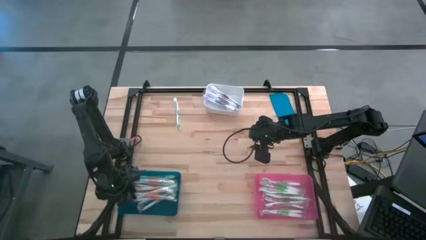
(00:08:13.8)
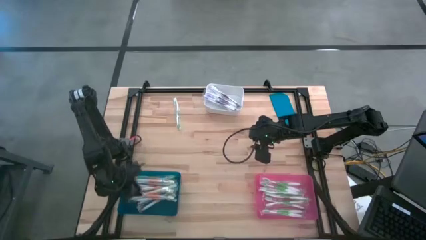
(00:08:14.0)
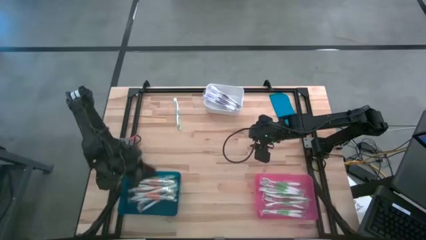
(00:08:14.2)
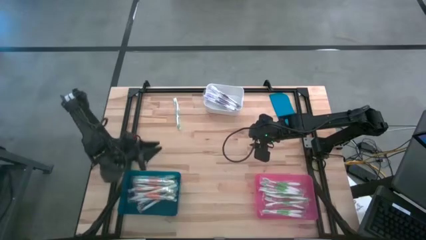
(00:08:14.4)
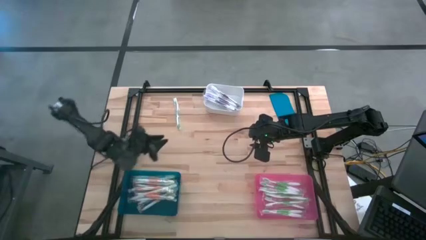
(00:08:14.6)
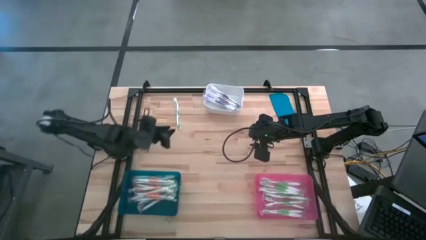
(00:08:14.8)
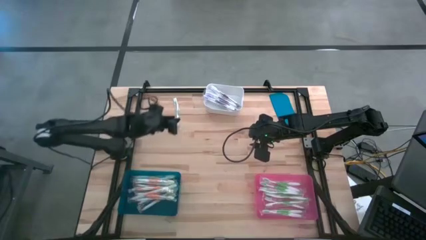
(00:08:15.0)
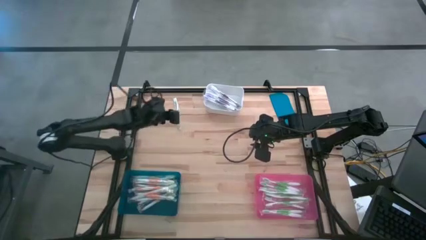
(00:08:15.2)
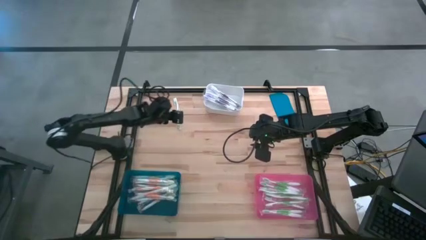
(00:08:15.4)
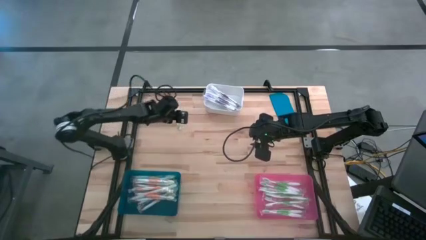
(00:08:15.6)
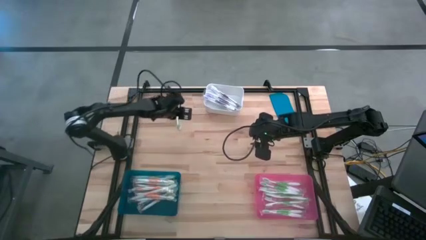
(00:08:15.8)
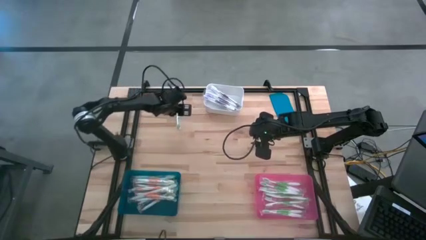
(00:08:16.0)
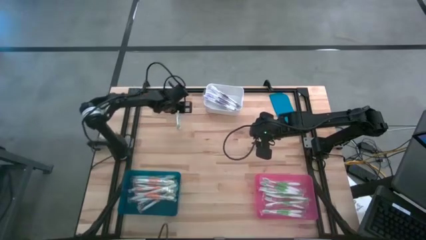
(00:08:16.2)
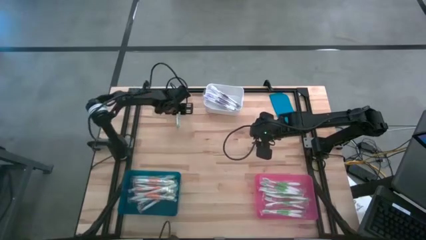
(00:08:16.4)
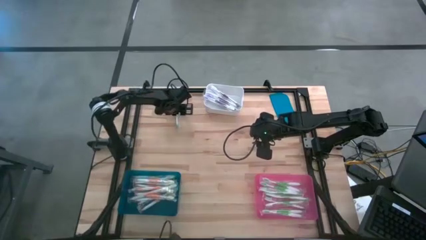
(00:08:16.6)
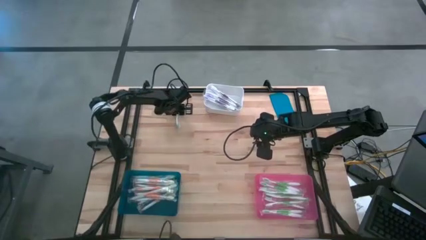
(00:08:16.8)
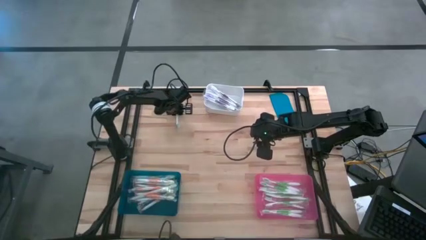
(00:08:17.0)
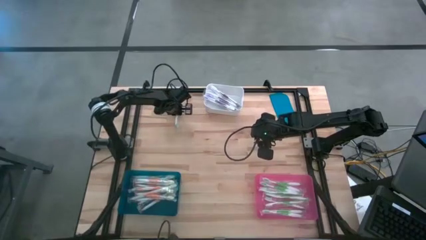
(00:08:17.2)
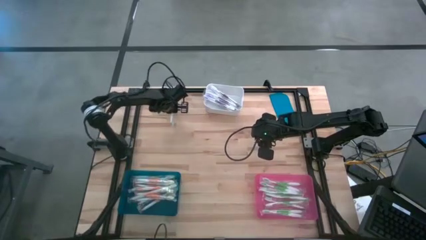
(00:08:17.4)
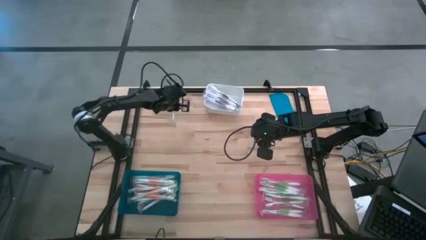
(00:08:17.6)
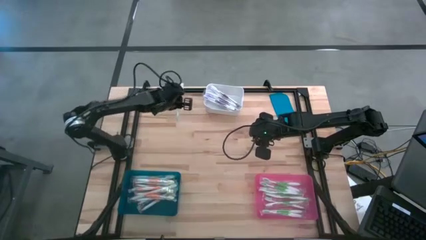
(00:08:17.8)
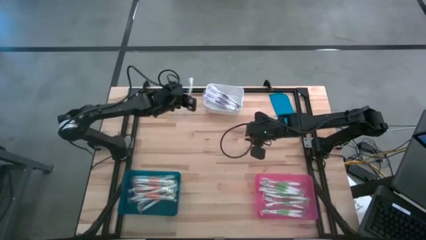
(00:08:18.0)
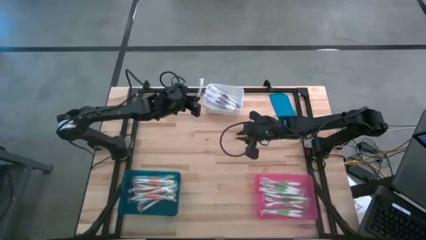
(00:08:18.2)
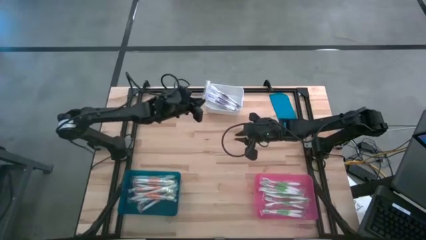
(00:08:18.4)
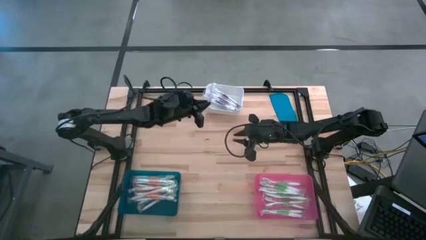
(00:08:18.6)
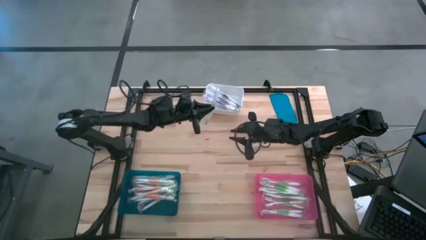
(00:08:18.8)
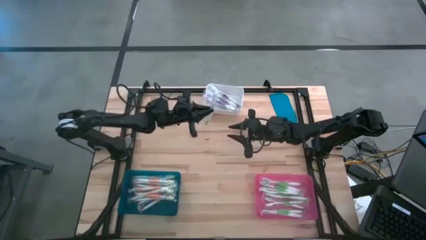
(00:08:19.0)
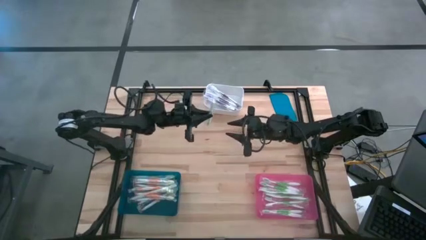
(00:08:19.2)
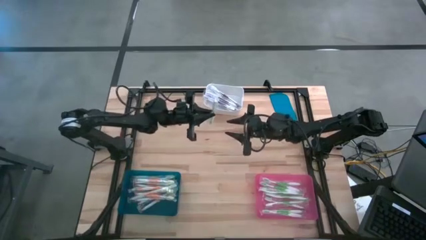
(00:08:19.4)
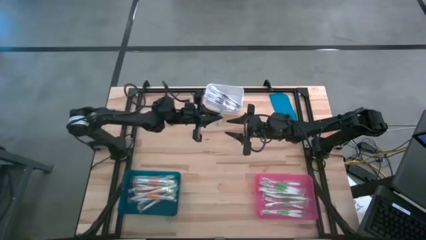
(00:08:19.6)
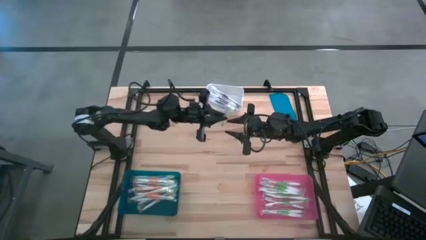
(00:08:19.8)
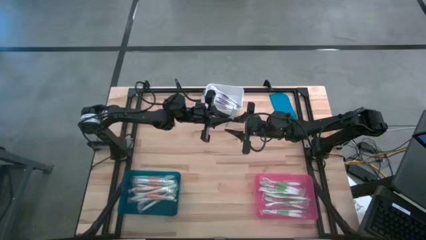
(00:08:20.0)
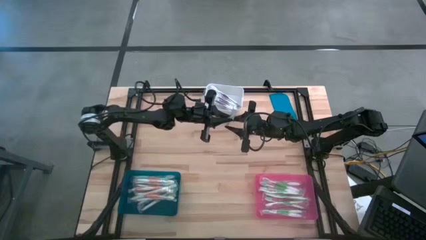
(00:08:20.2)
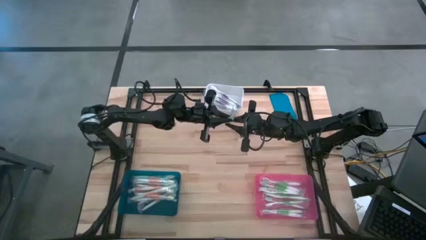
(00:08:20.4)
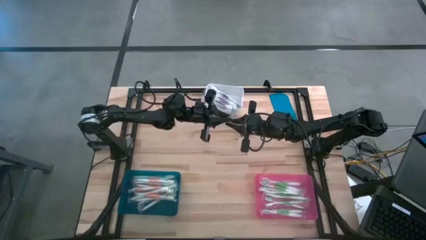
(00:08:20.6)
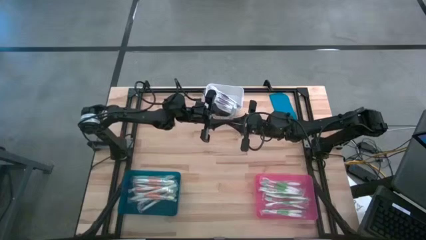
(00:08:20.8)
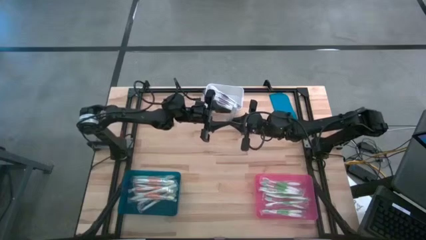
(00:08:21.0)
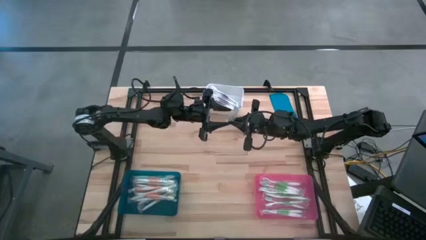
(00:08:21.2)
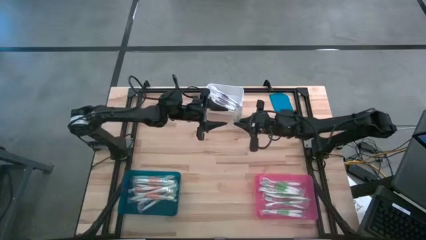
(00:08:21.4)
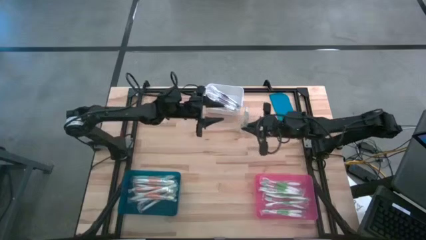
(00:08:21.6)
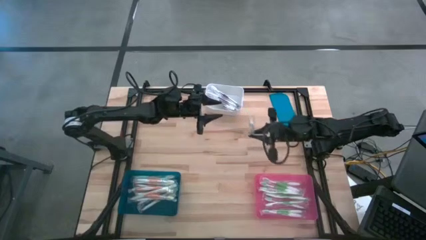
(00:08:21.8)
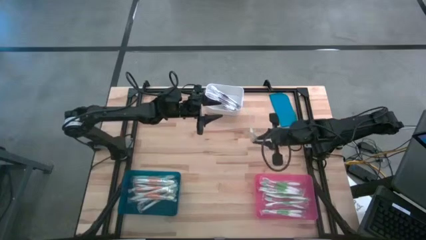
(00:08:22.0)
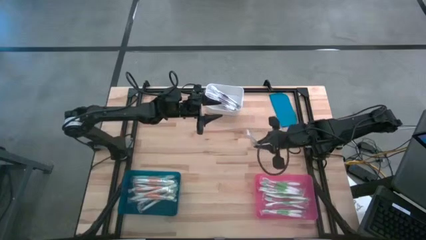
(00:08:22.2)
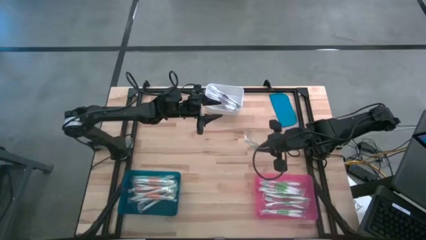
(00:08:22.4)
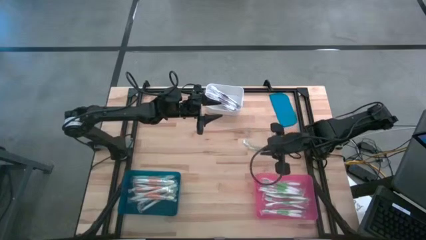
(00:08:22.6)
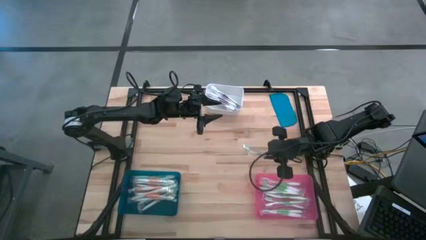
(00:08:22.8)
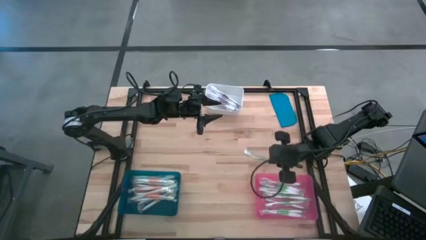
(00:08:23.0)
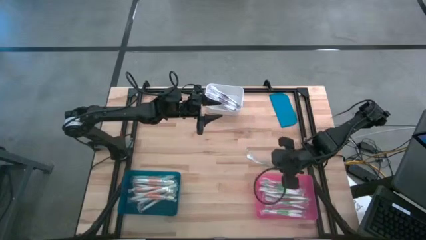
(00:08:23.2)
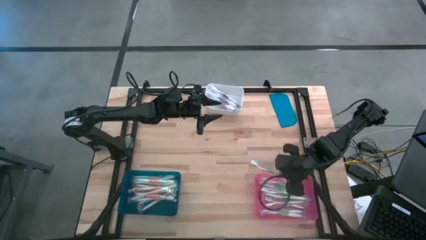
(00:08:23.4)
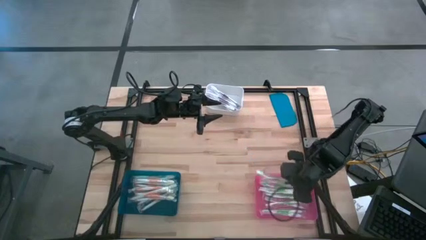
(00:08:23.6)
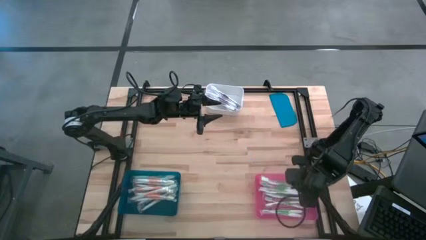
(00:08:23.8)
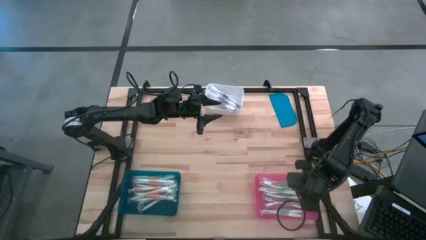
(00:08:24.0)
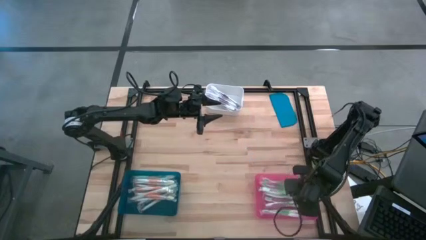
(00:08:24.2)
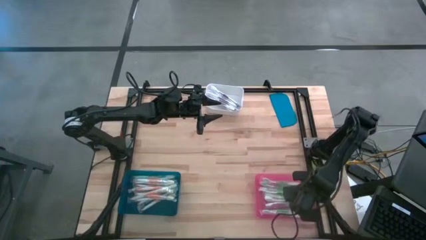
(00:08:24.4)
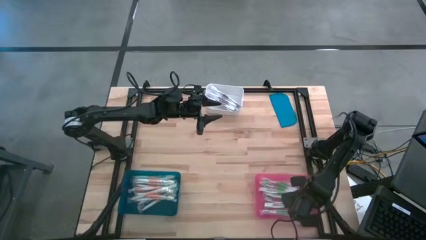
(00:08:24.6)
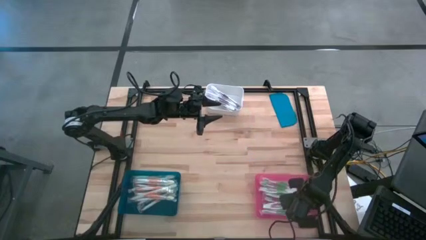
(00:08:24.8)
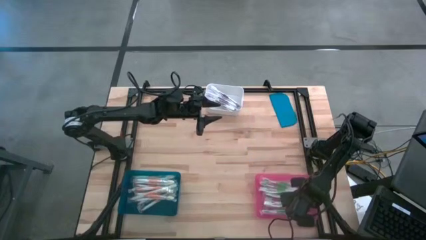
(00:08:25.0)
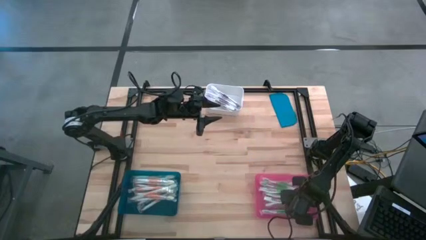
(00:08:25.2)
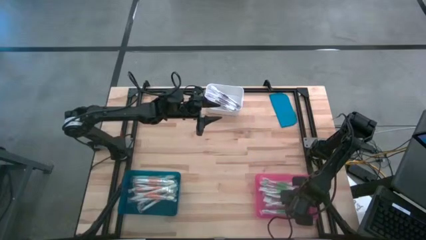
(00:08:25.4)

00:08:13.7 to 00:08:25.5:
Task: Pick & Place Toothbrushes
Put the green toothbrush into the pink bin

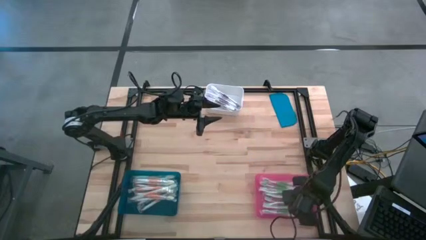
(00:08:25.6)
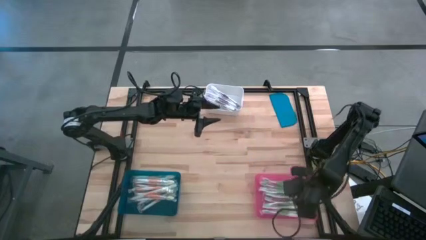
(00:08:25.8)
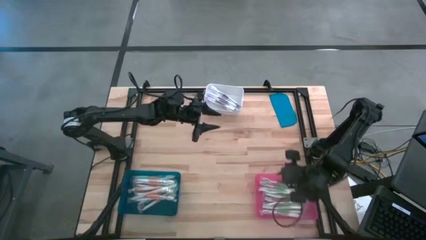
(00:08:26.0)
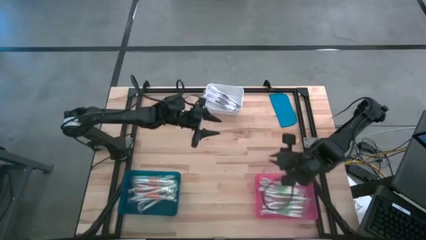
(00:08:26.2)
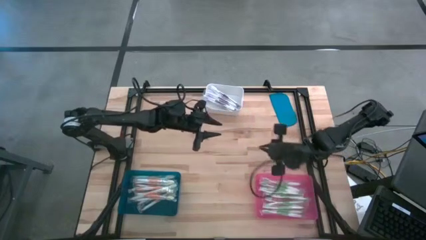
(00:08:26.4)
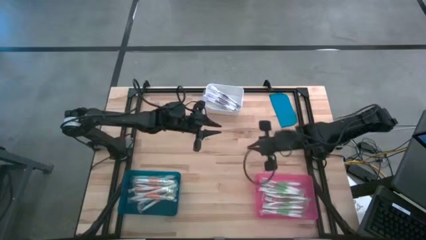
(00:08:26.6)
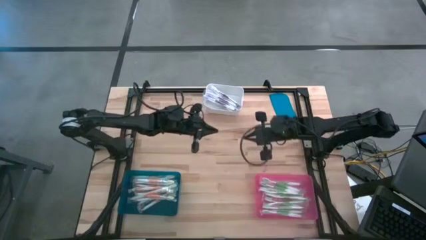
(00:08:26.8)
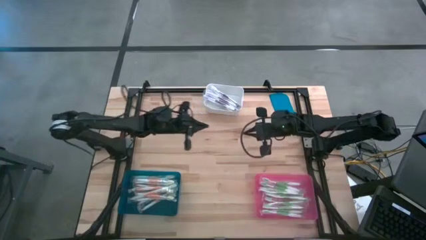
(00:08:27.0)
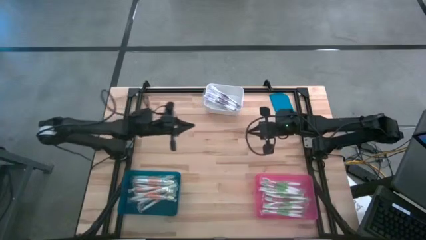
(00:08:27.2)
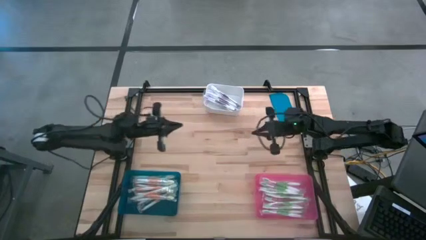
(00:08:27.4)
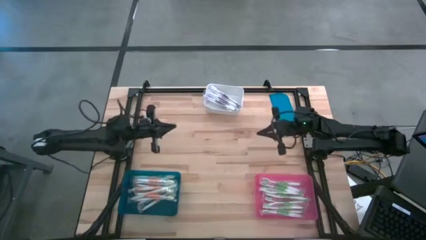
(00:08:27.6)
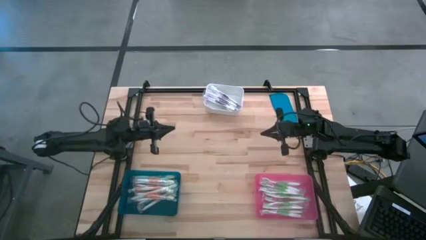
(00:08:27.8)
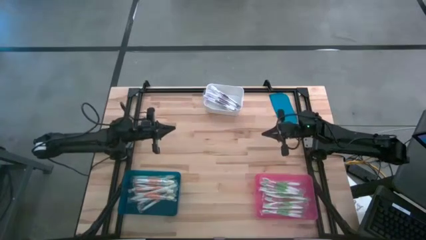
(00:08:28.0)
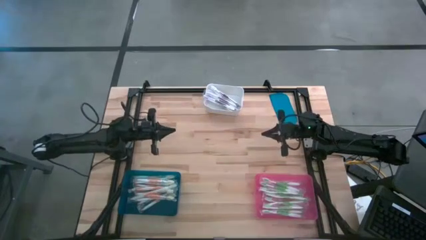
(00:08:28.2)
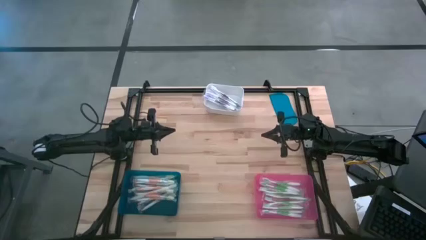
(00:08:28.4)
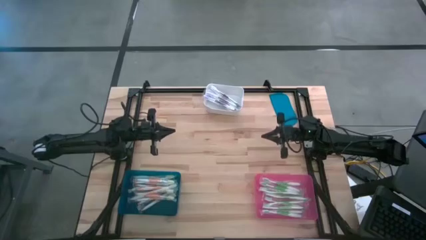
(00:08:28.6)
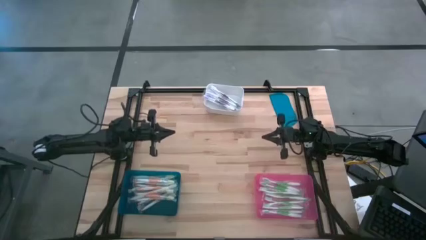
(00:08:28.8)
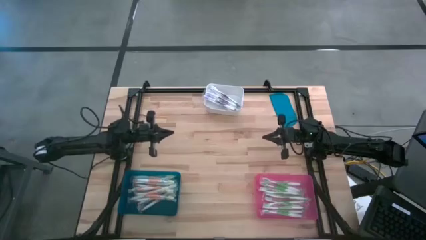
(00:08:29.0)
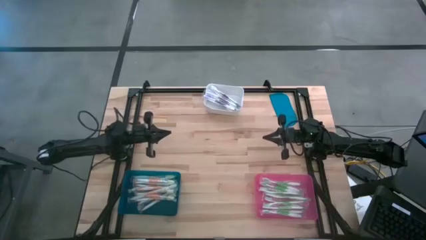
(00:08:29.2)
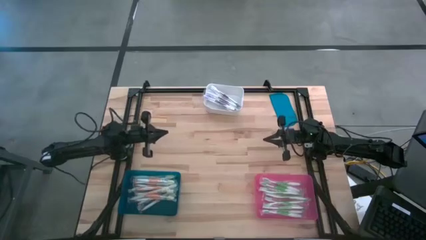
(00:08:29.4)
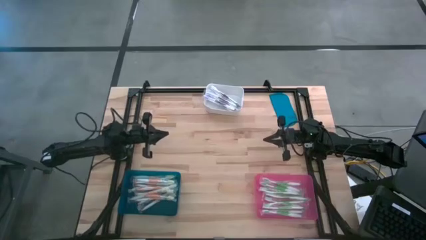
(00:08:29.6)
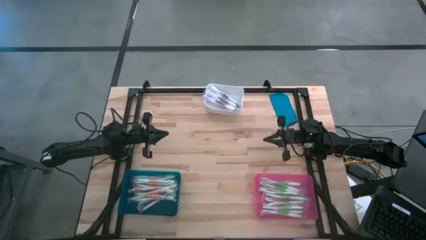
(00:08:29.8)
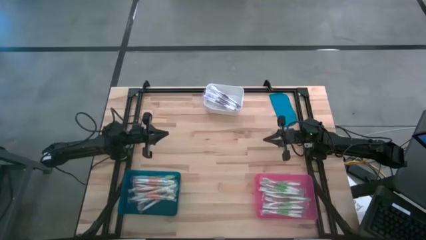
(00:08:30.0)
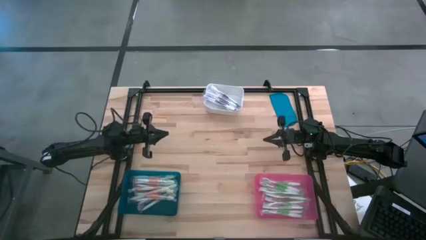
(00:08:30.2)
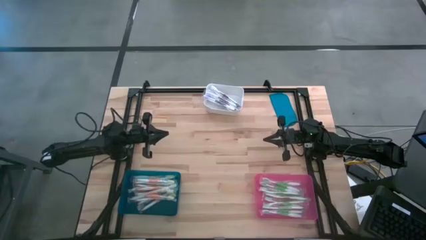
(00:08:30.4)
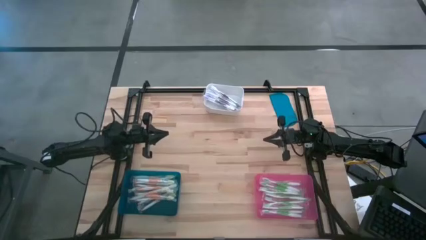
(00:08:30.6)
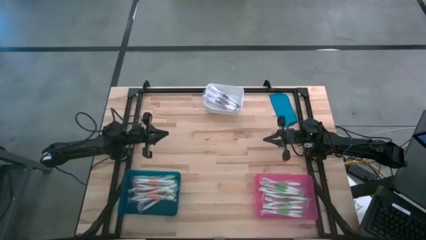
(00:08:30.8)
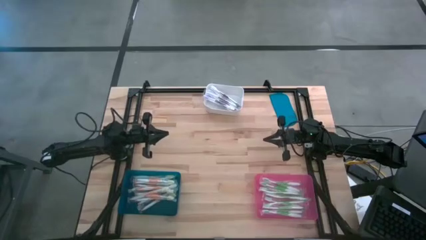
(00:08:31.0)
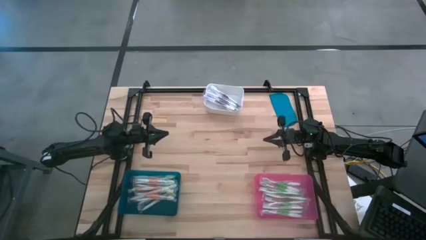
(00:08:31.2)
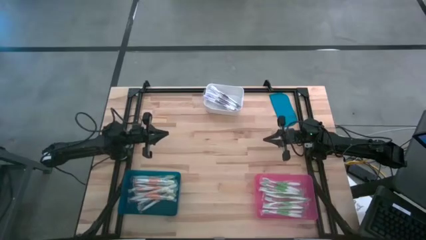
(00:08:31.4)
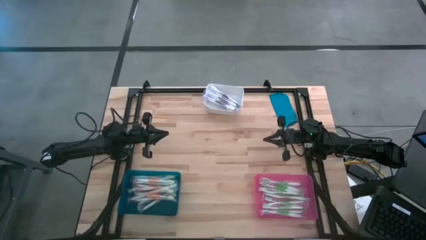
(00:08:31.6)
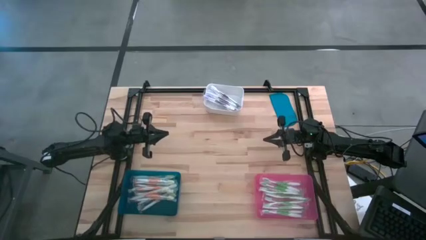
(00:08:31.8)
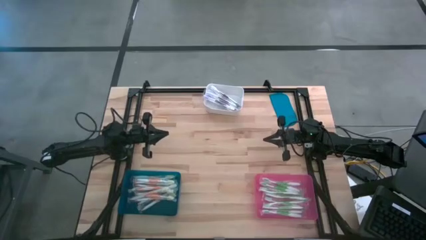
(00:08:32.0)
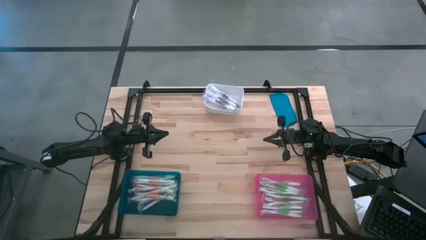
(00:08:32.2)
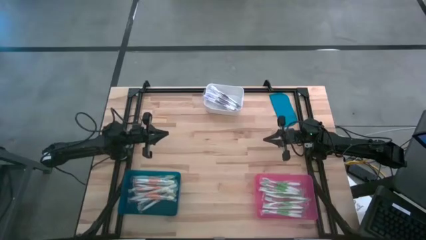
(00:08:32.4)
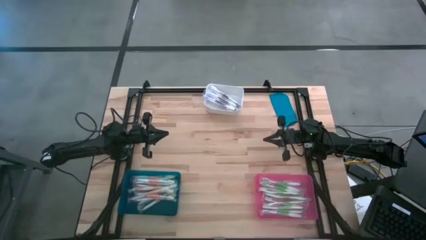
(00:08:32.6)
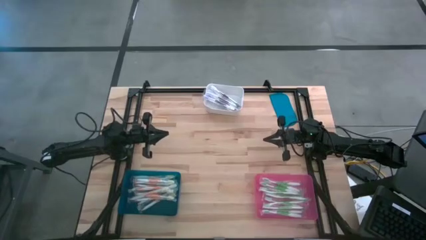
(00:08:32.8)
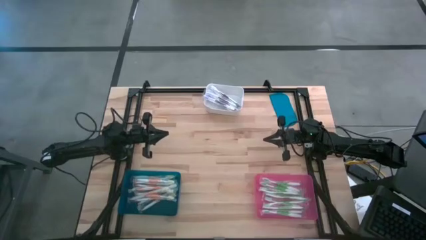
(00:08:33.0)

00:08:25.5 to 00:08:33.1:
Return to Home Position
